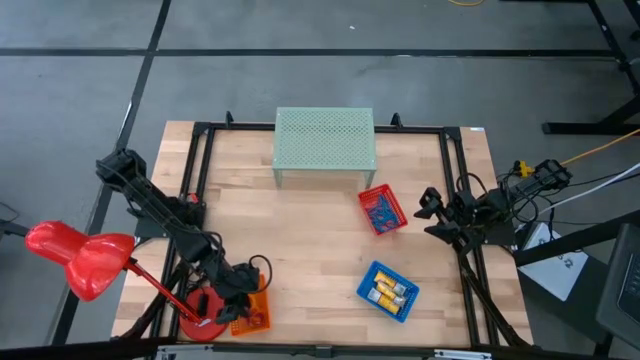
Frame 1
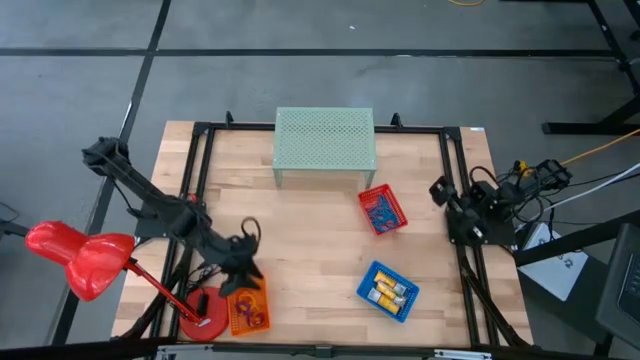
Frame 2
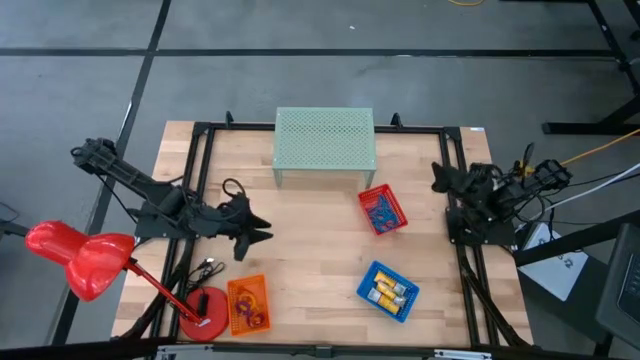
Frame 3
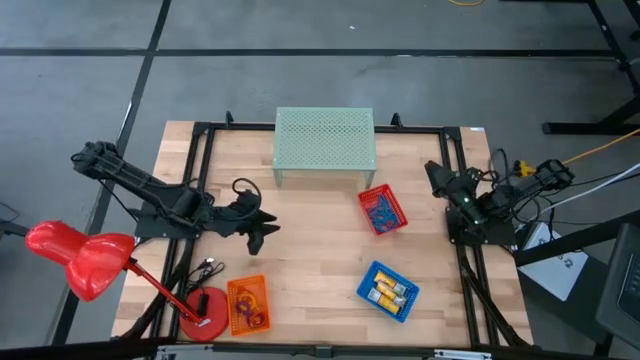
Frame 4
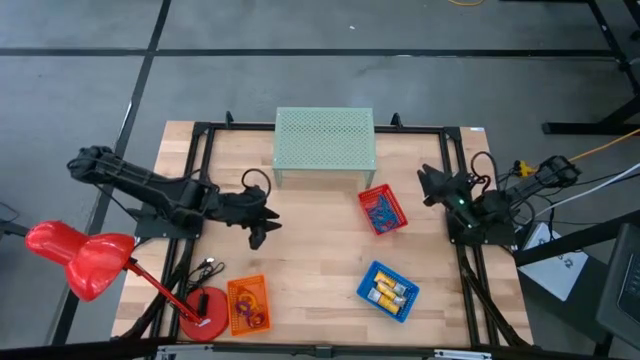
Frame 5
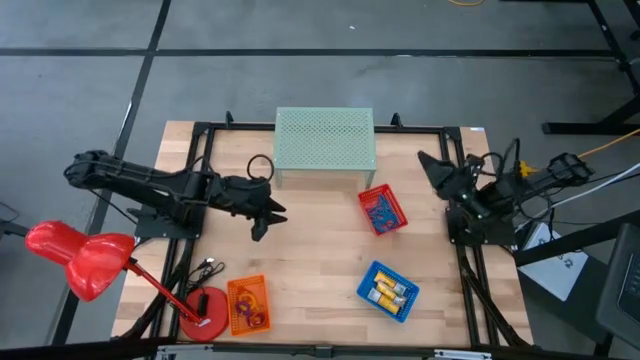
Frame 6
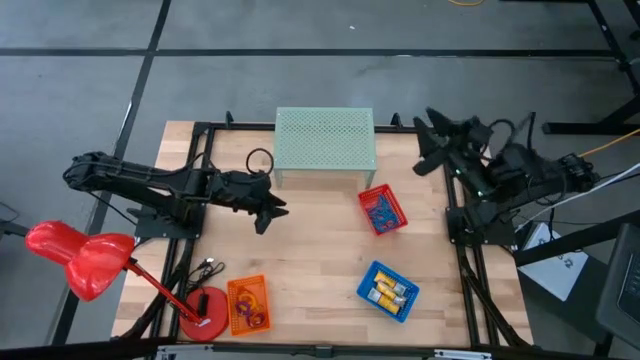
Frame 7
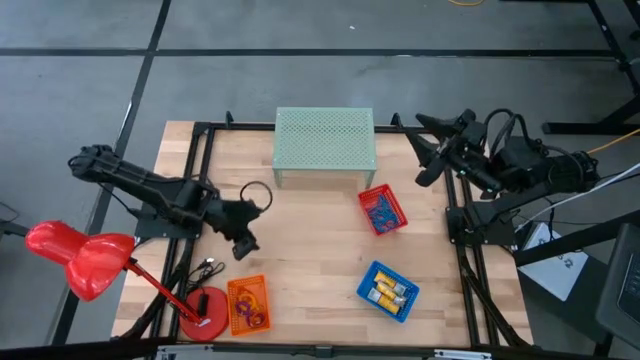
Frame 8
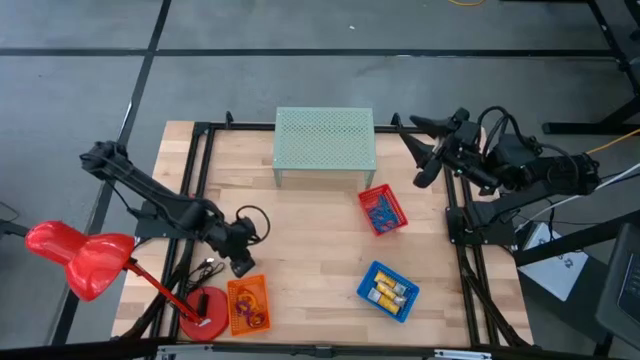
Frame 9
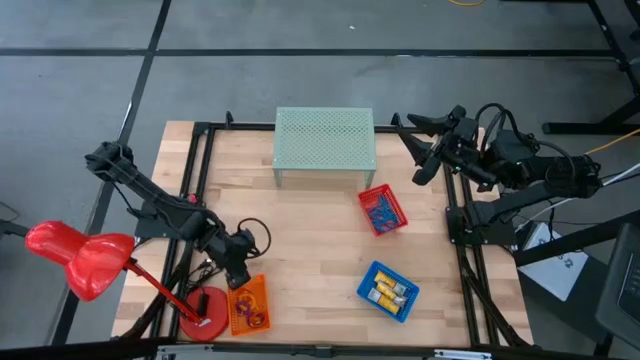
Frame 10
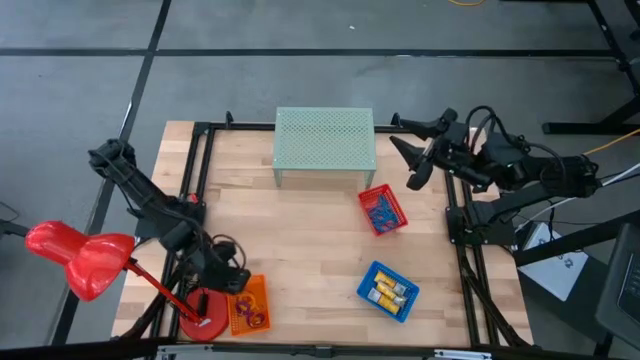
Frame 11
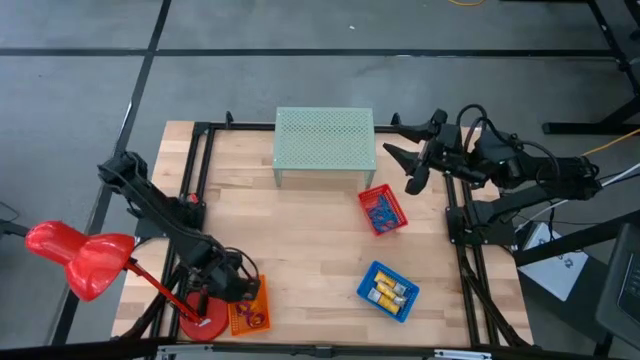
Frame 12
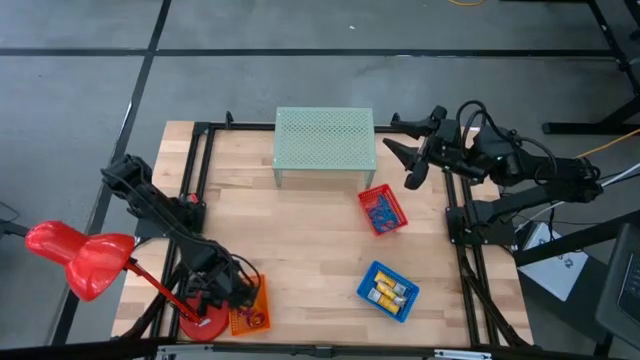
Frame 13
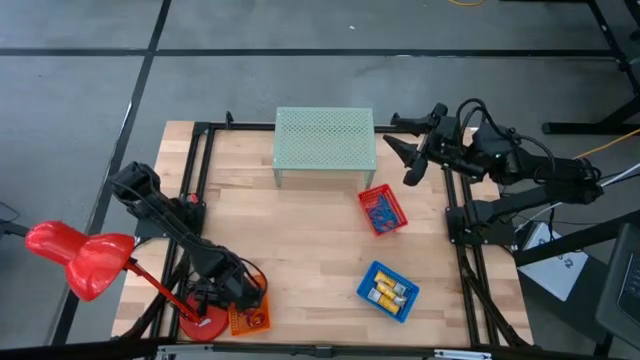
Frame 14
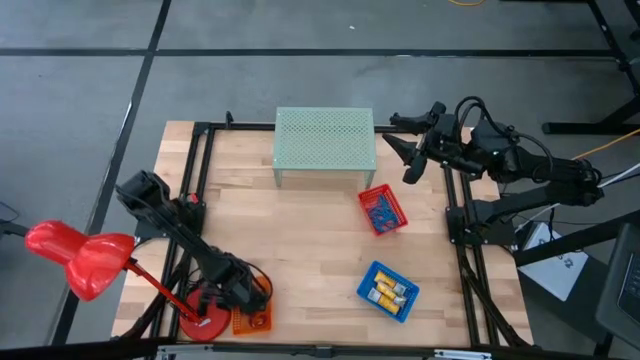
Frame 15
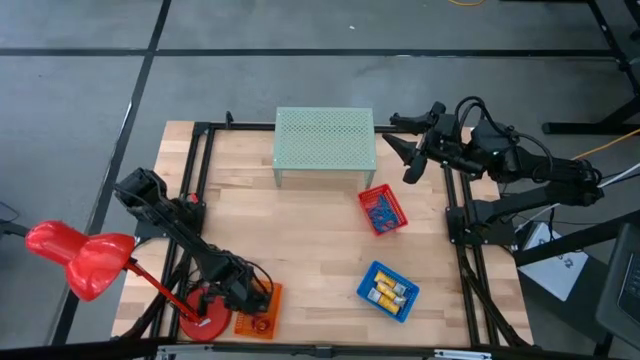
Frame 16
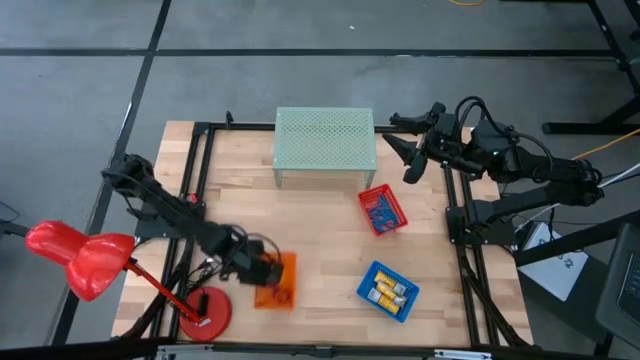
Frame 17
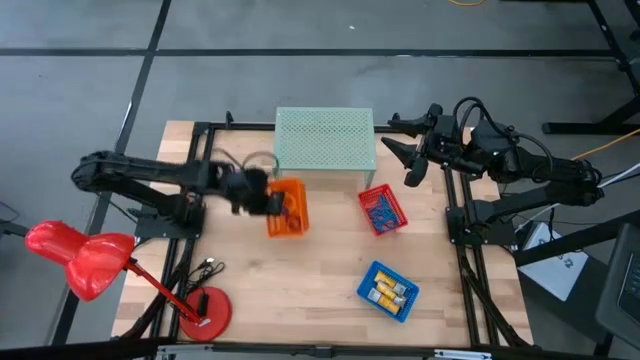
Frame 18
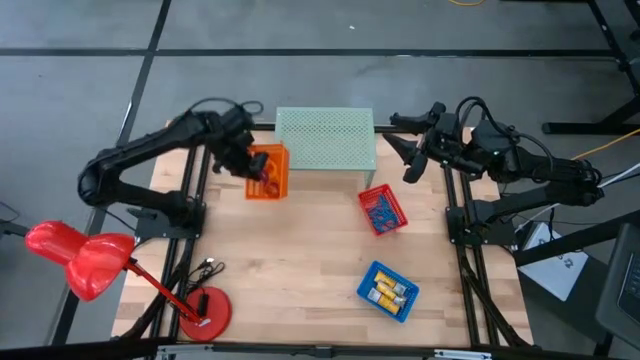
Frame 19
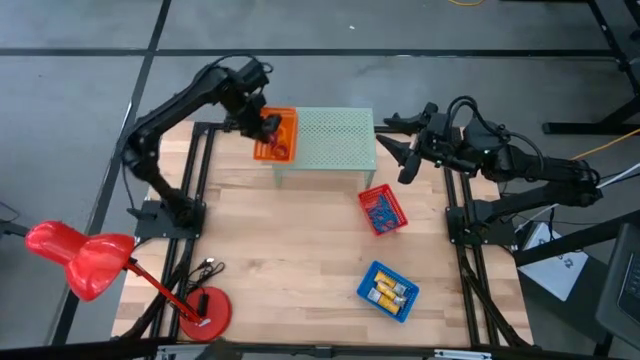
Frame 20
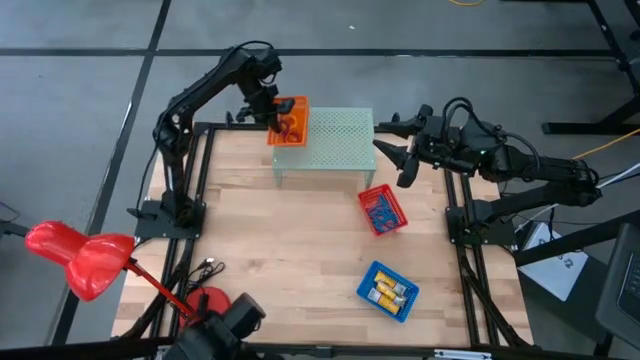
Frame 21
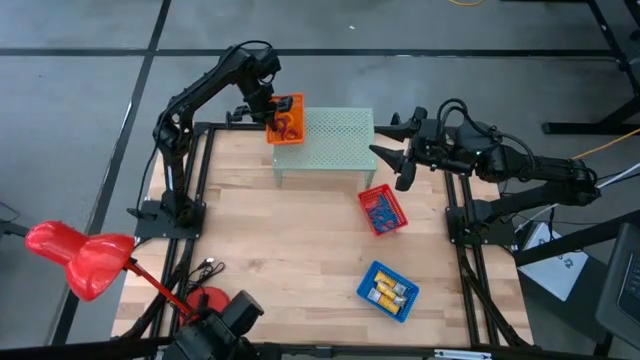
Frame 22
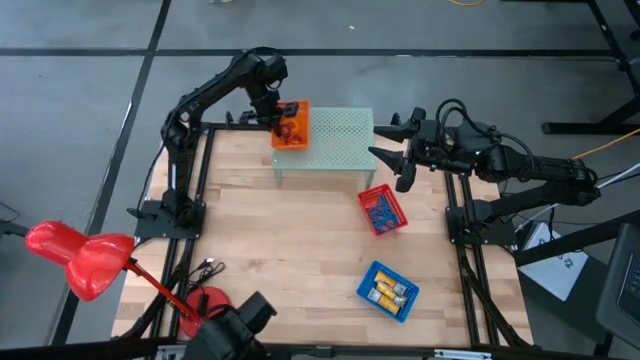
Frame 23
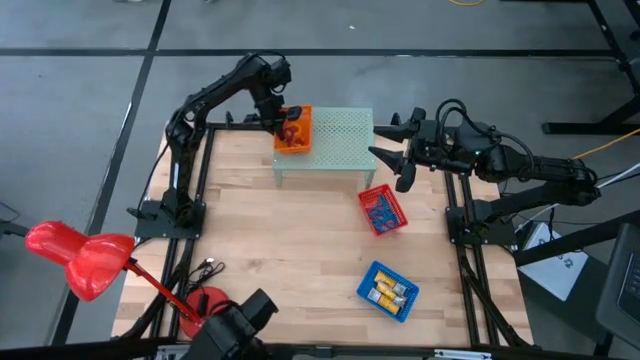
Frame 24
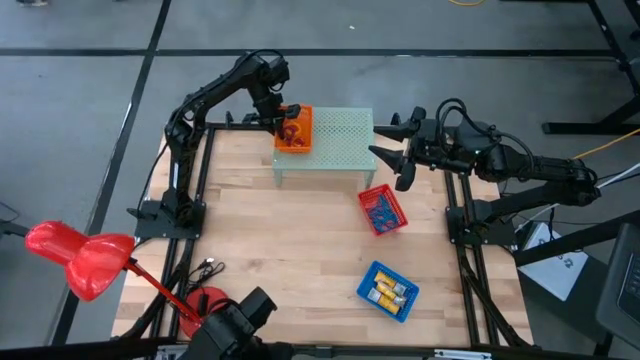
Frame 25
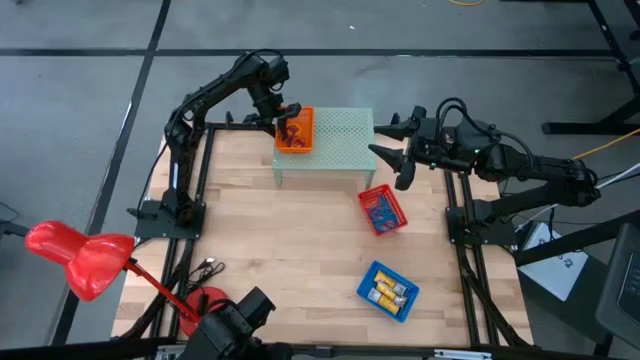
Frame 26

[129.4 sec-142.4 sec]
Task: Pick & Place Office Desk Supplies
Put the orange basket with spring rubber bands on the shelf

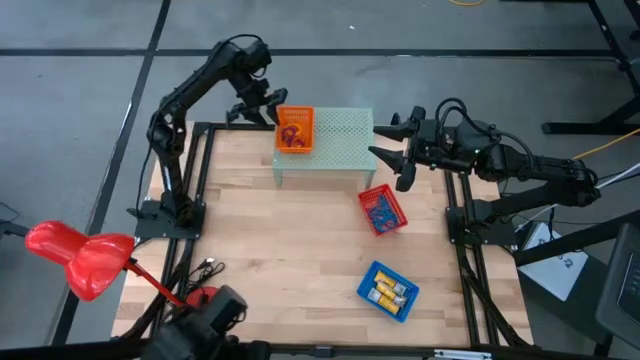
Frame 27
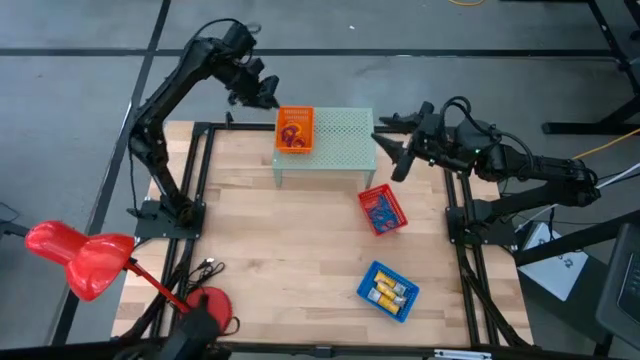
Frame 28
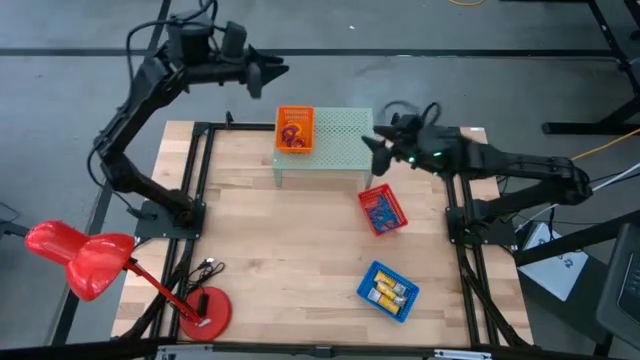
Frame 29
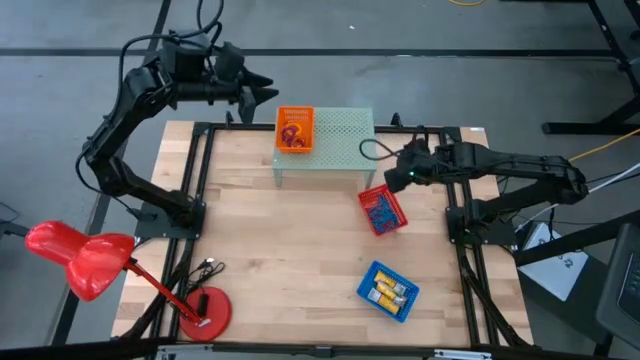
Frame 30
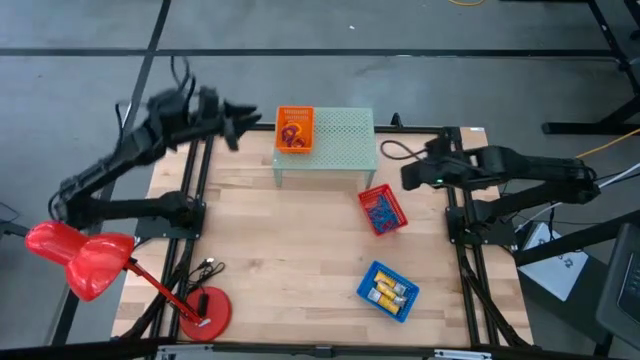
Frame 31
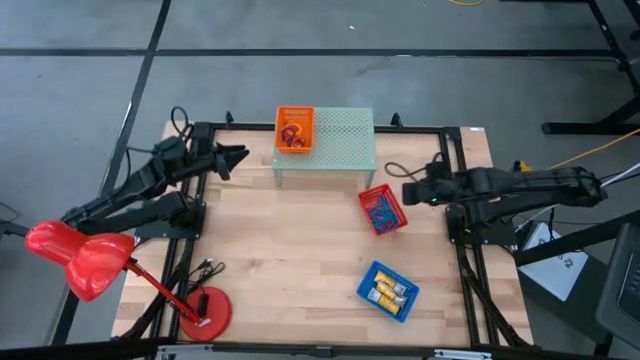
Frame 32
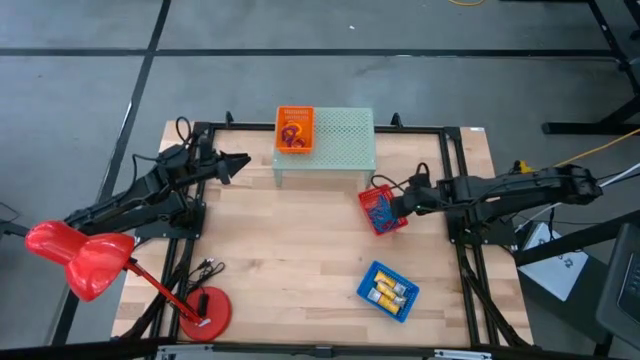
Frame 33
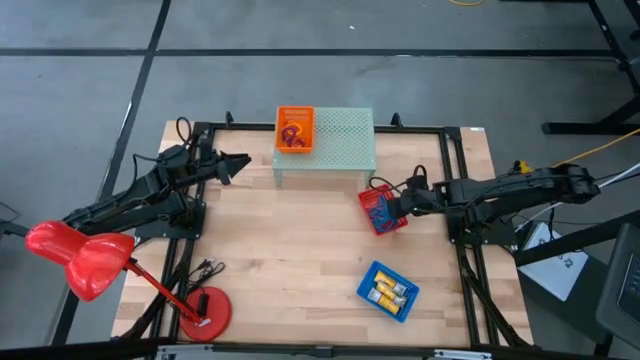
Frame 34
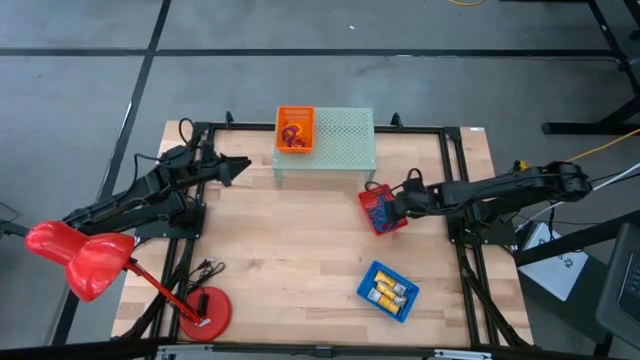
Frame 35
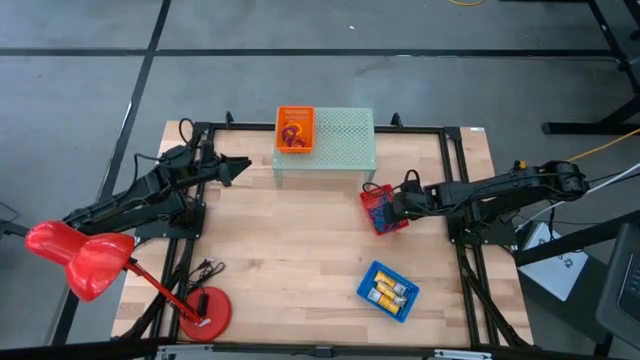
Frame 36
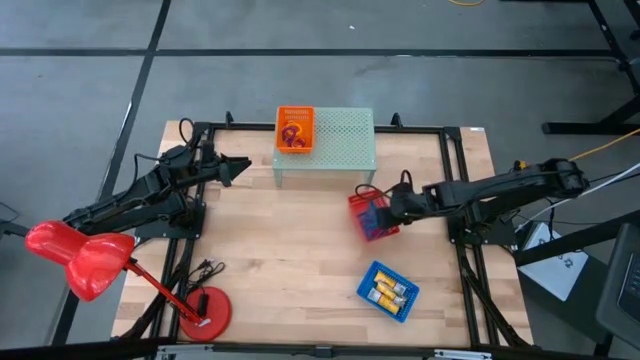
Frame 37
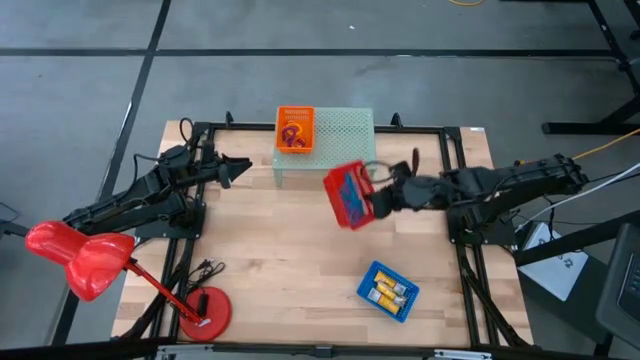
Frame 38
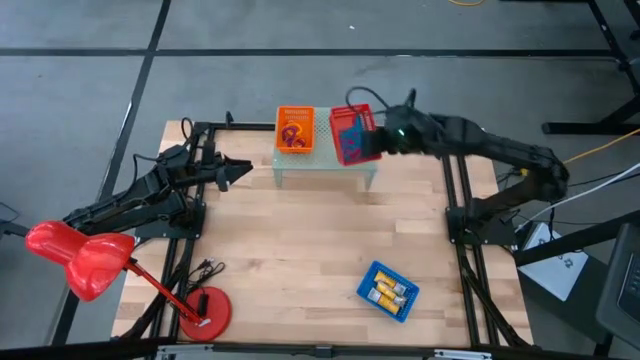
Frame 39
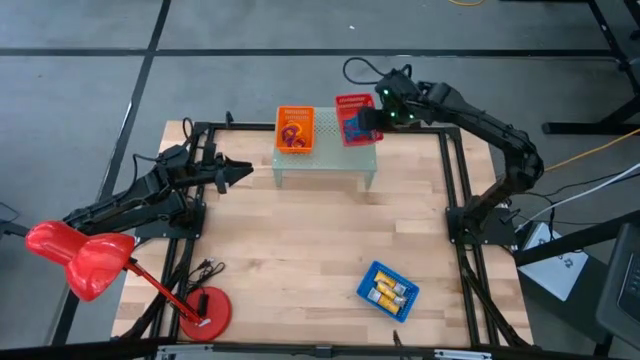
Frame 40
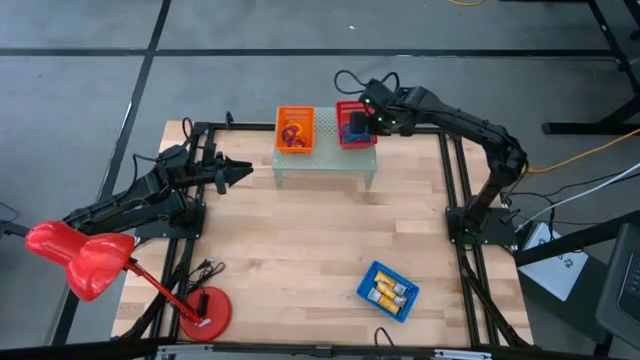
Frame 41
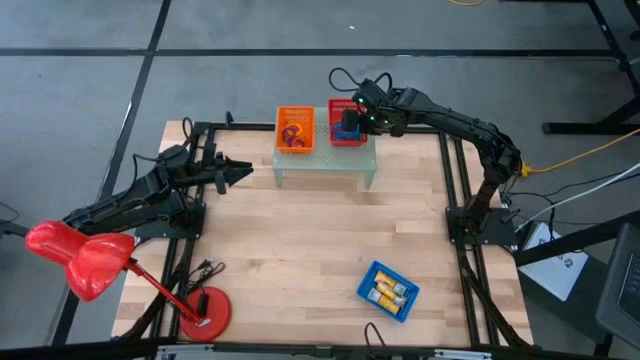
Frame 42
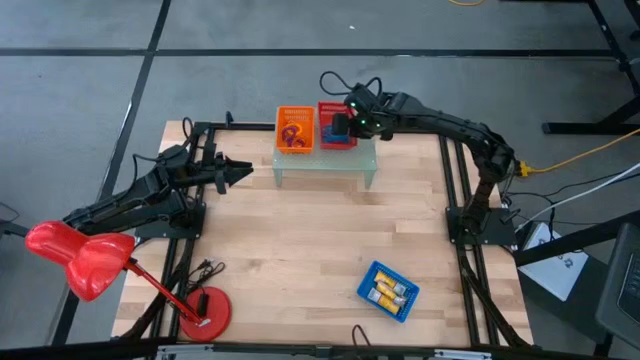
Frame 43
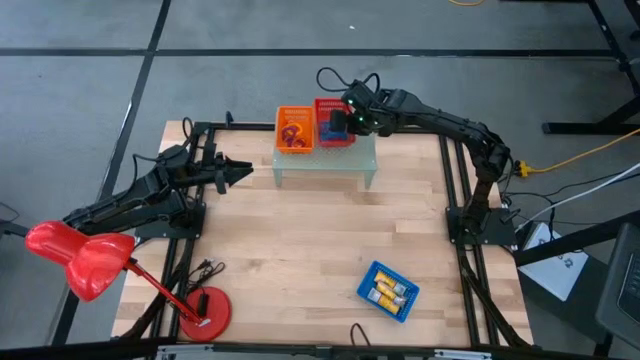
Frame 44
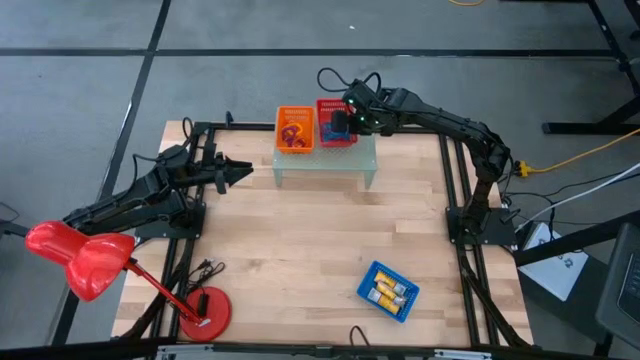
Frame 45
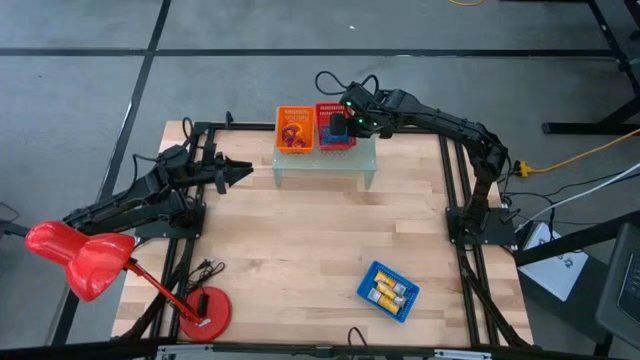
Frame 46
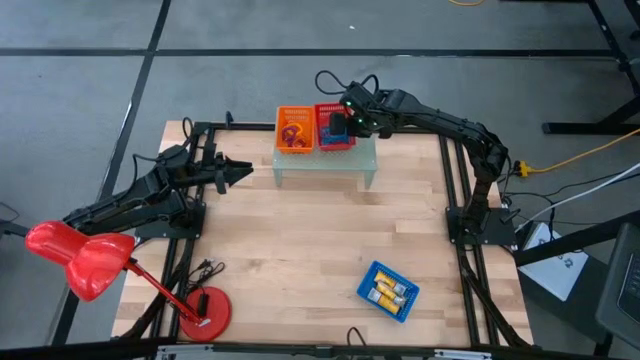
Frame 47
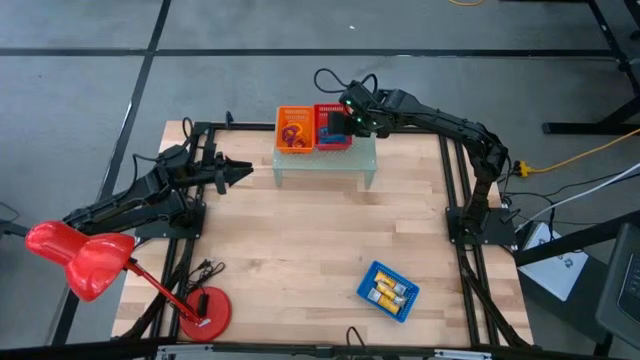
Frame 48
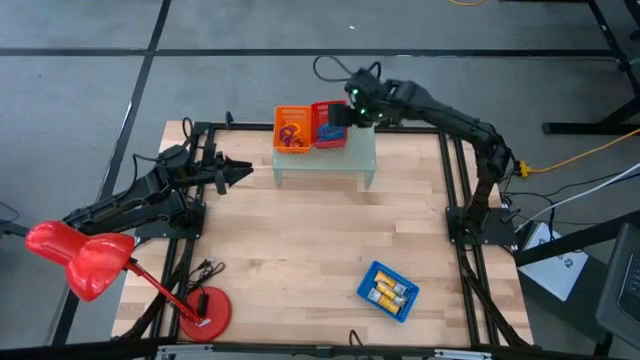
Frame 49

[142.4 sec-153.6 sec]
Put the red basket with rubber bands on the shelf
